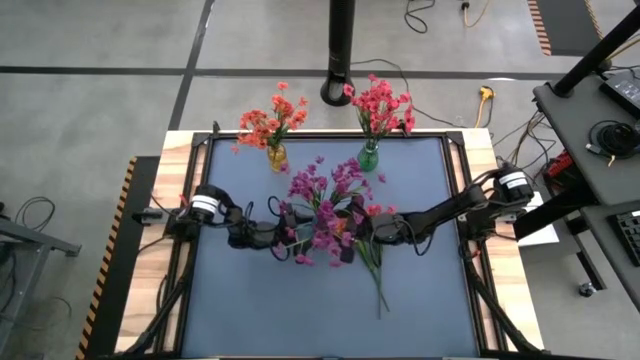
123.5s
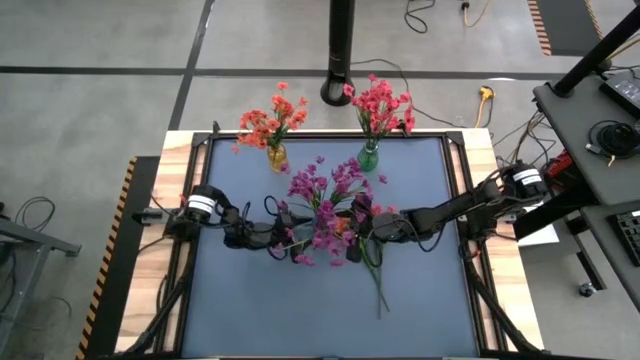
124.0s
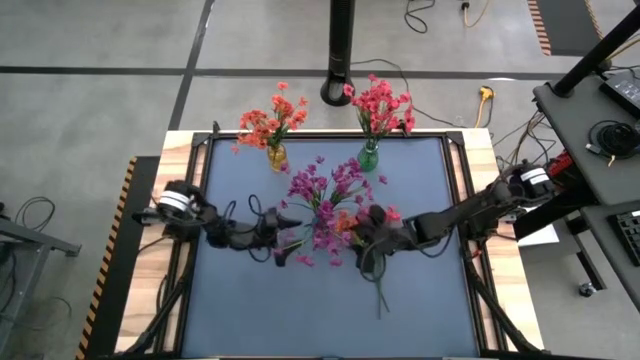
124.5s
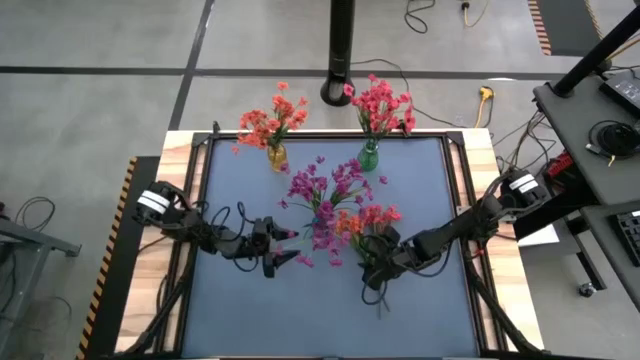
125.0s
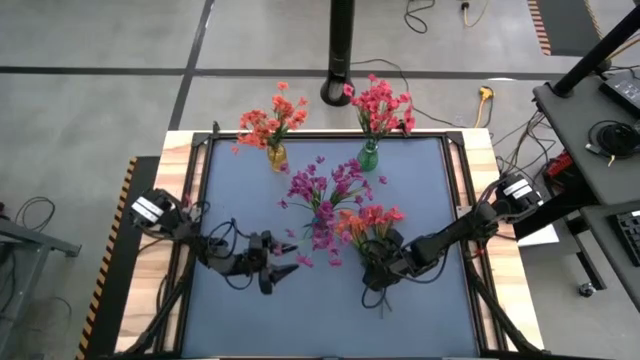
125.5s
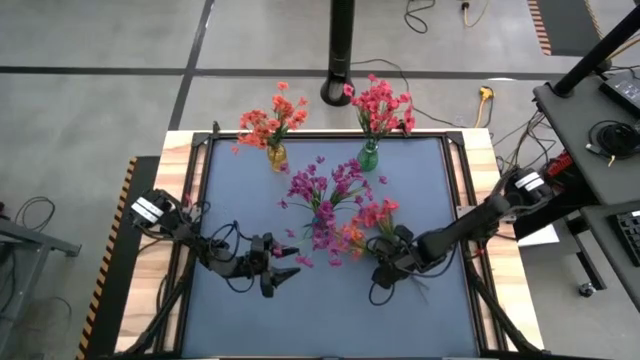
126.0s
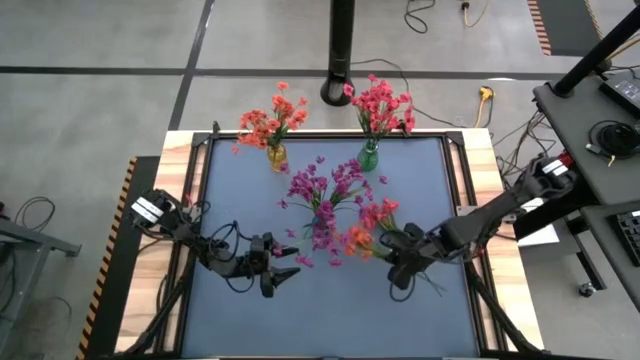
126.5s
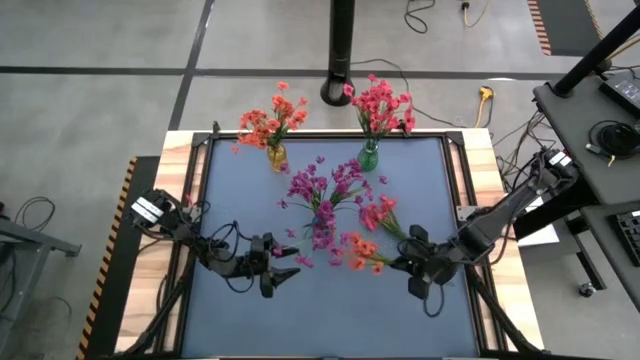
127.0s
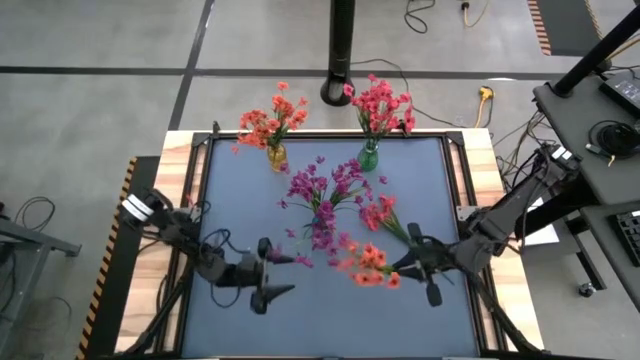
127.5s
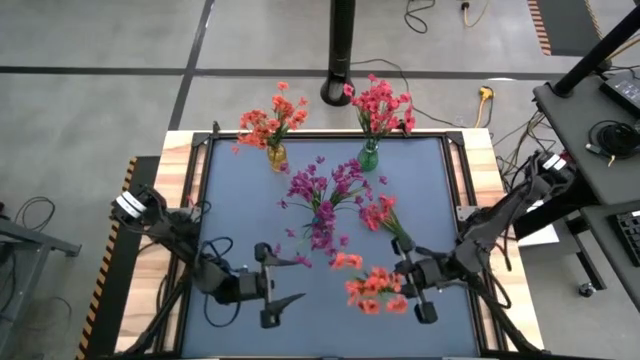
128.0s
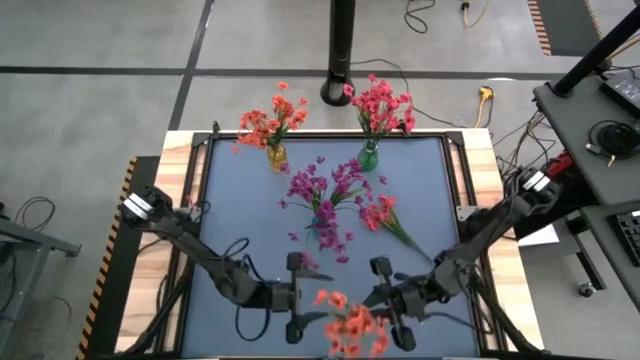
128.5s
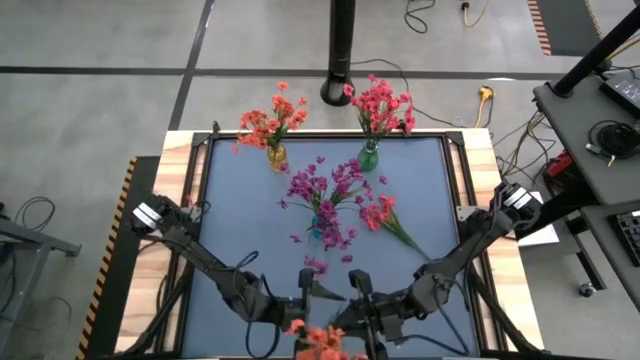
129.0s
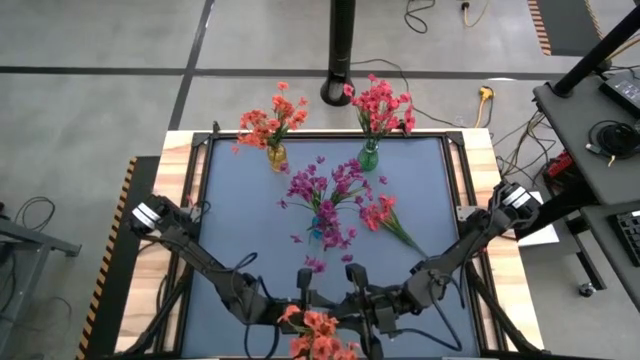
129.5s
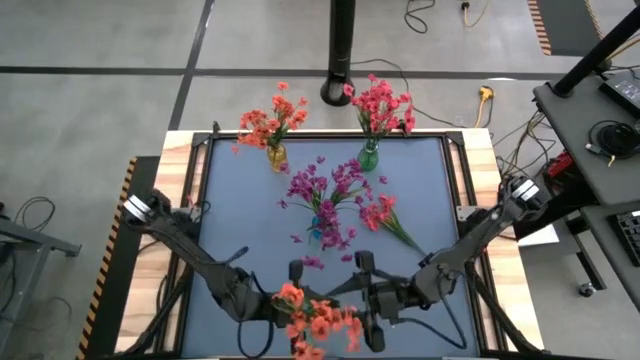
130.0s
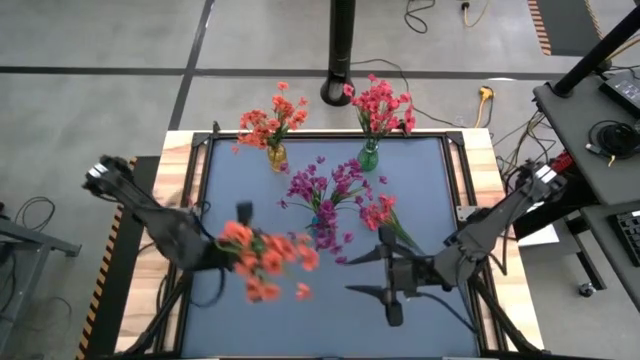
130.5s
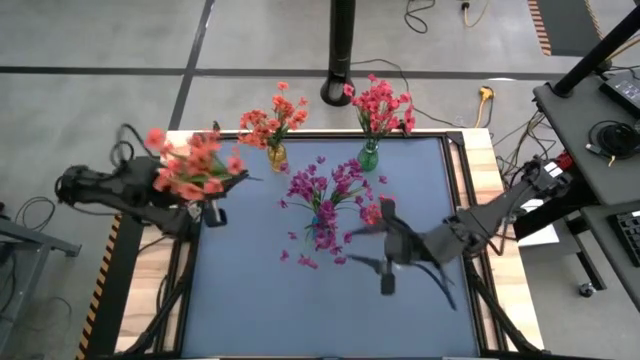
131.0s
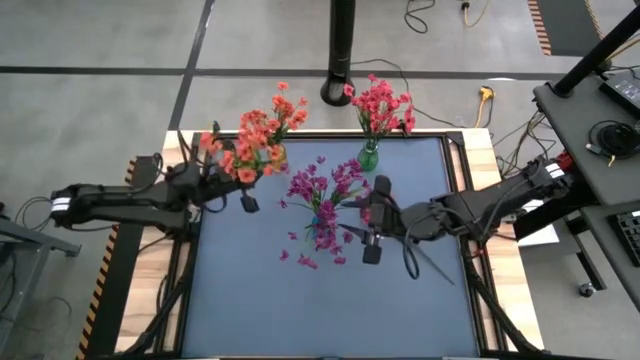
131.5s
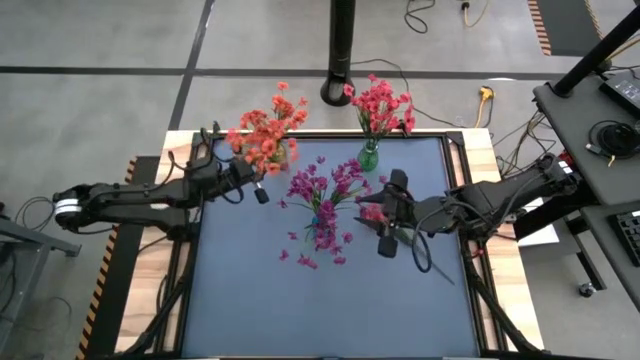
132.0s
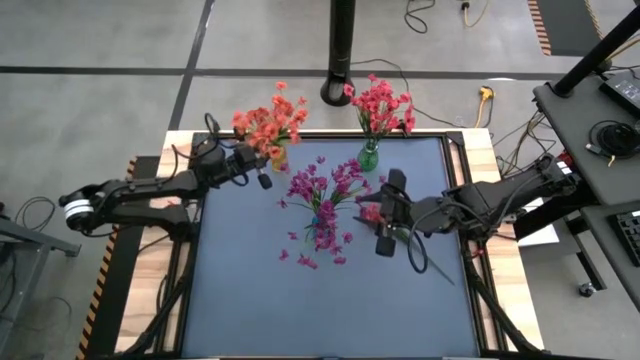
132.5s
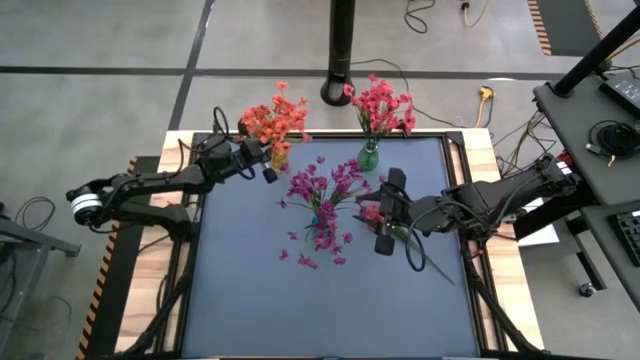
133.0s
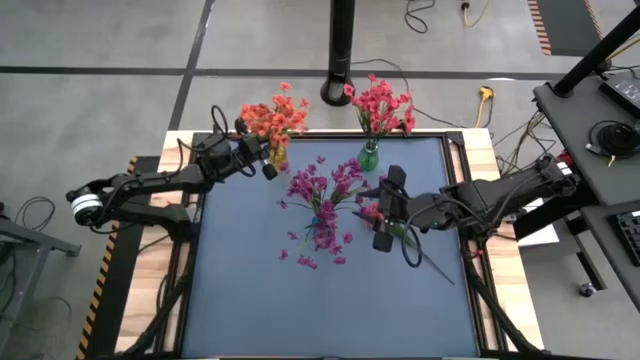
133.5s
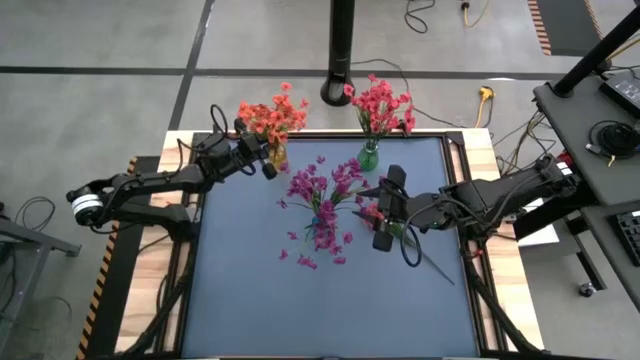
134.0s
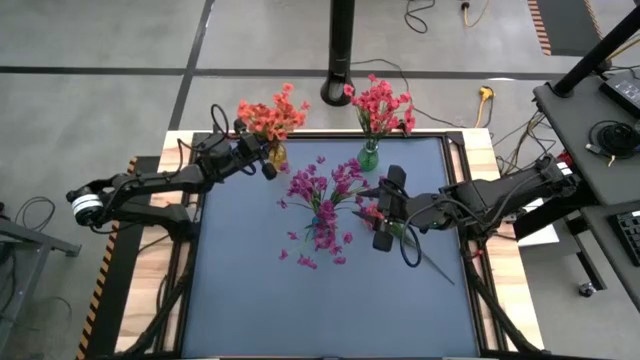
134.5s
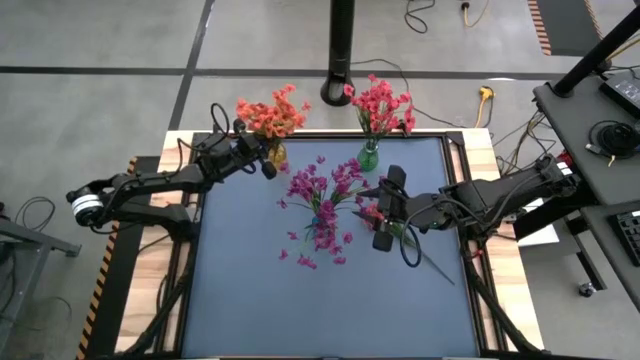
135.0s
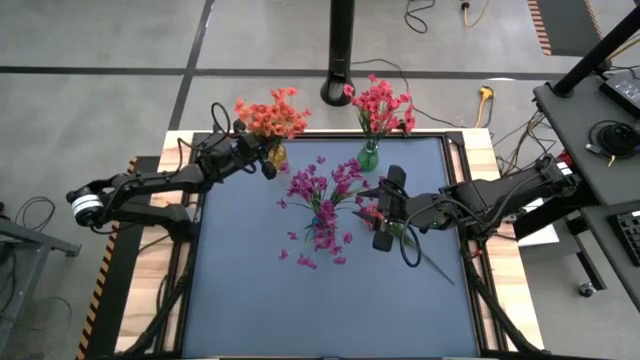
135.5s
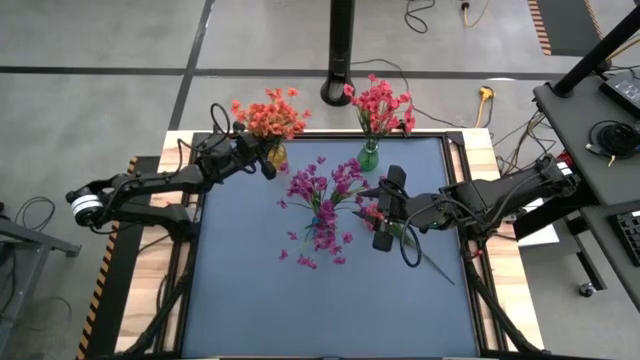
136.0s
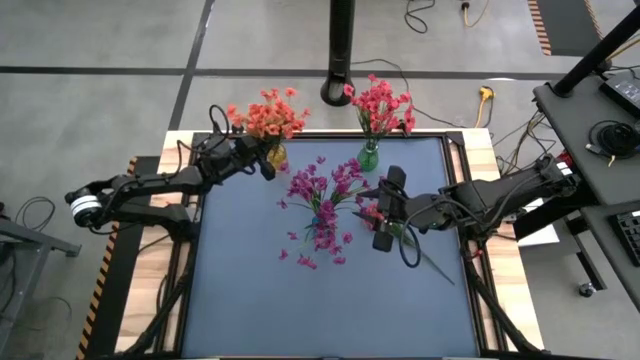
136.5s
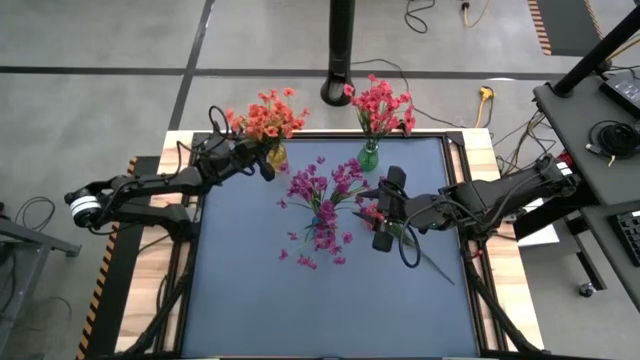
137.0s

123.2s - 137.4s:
Task: Sort flowers into vase by color
Put the orange flower into the yellow vase

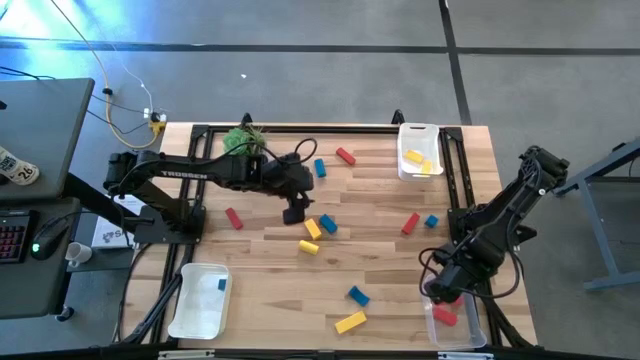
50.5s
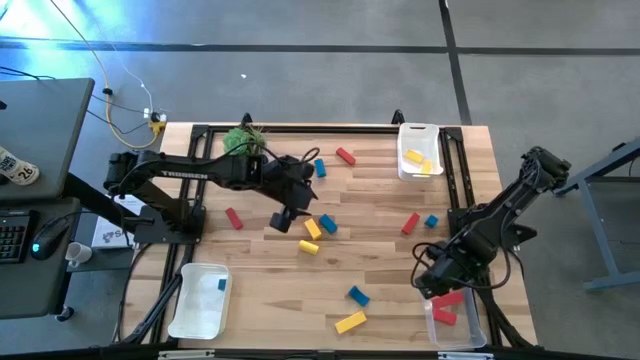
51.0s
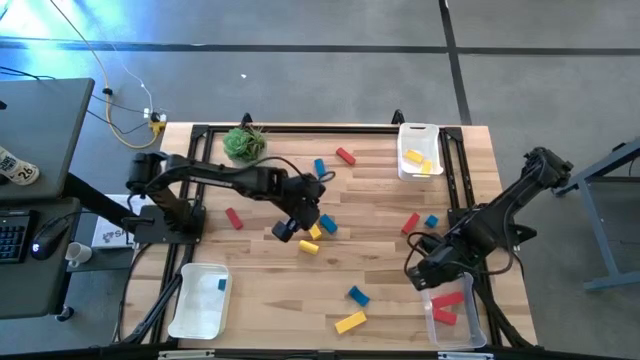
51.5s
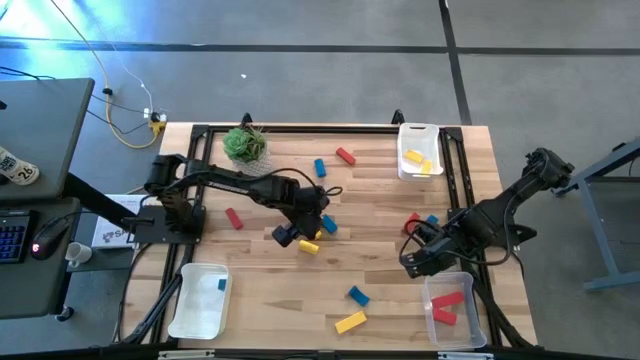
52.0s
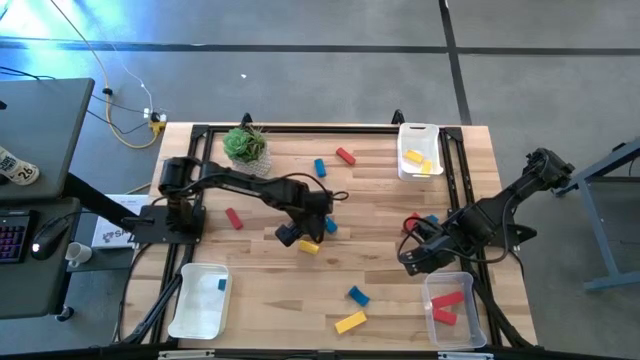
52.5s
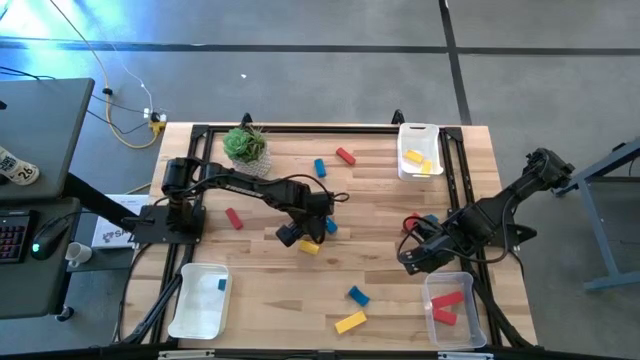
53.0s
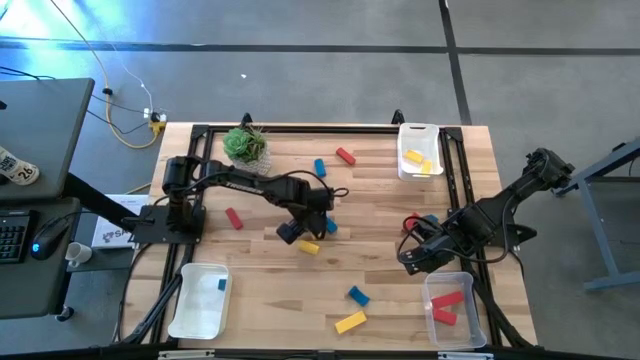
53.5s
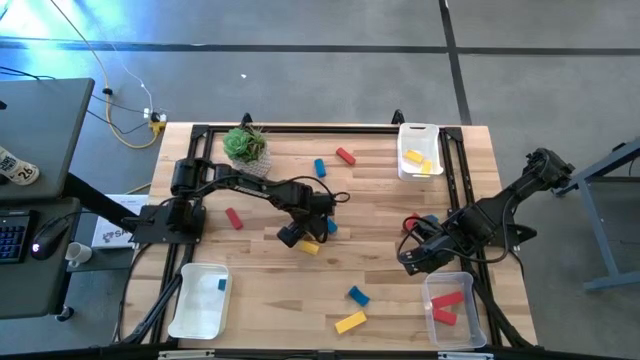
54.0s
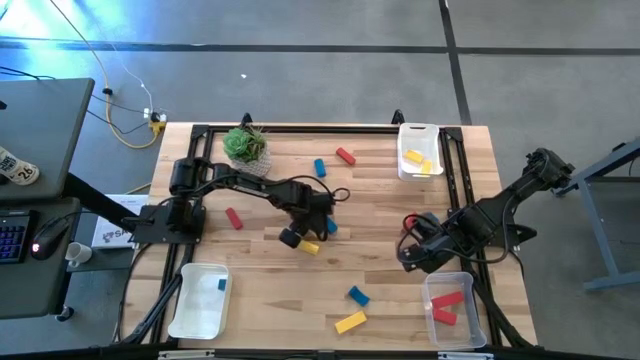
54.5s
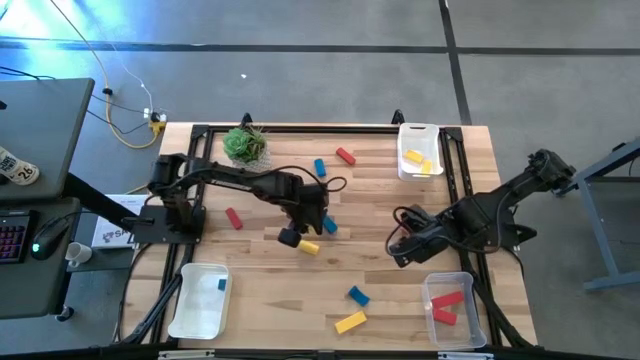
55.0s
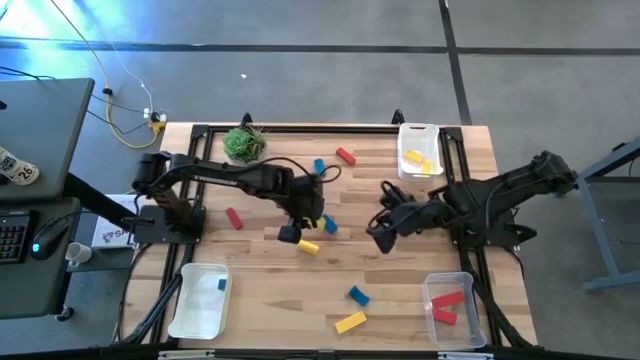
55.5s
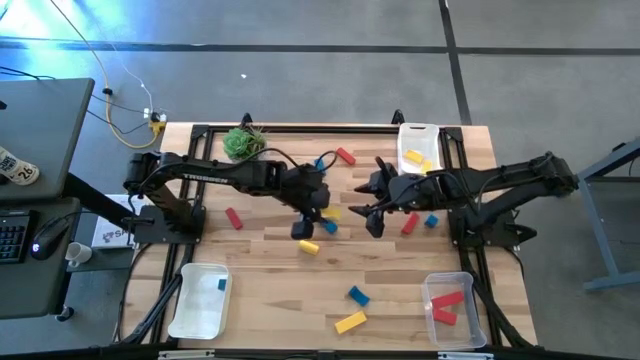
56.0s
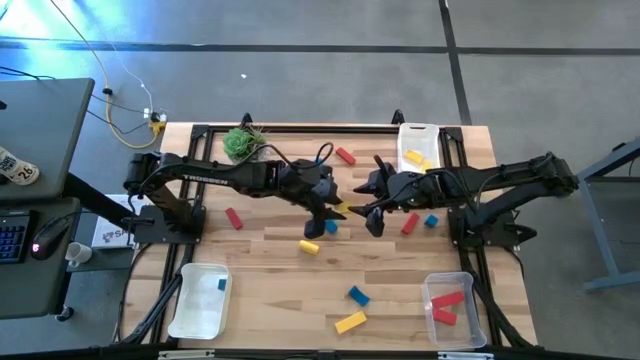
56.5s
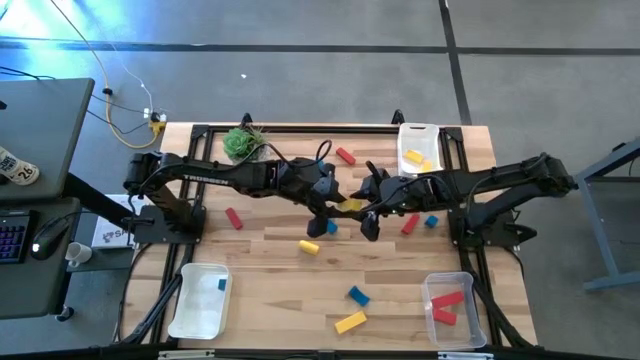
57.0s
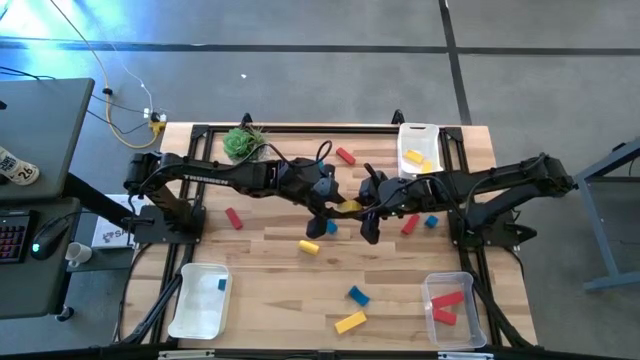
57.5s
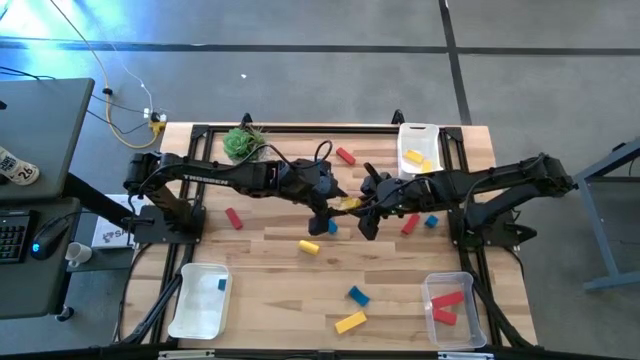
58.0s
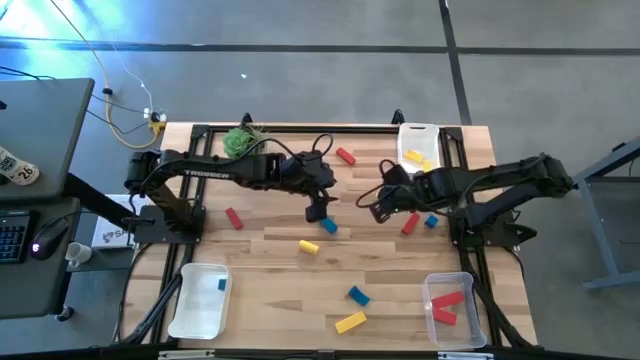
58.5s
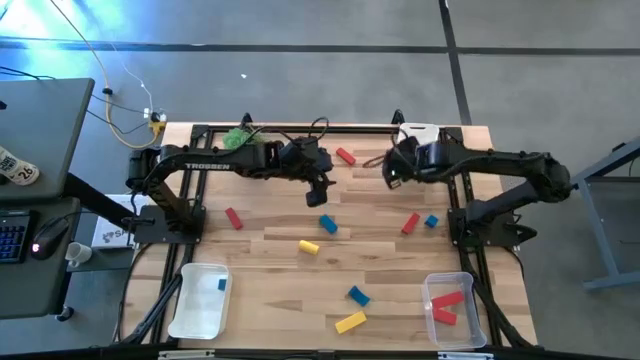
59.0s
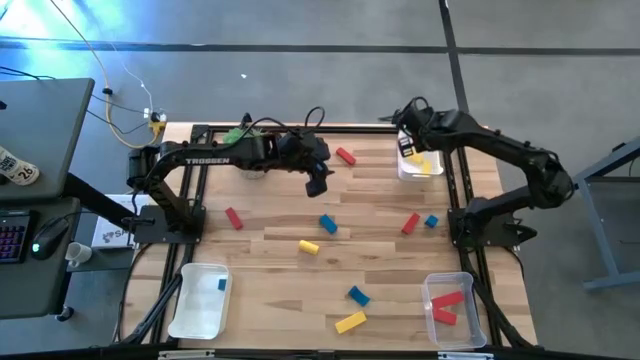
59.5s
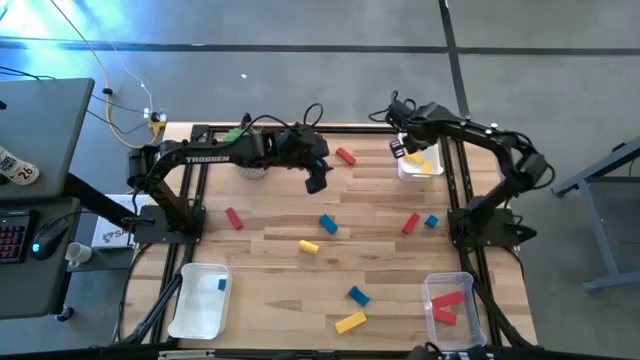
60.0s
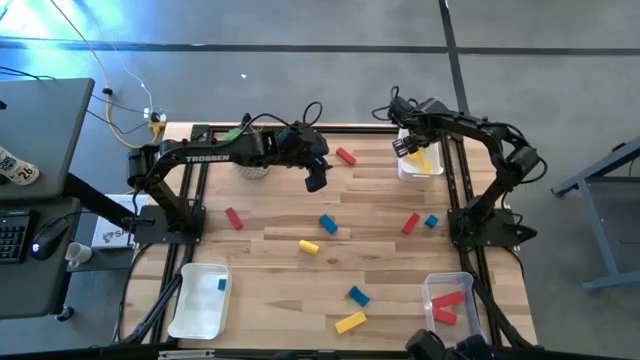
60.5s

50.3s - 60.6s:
Task: Sort & place blocks by color
Put the yellow block into the top white bin
